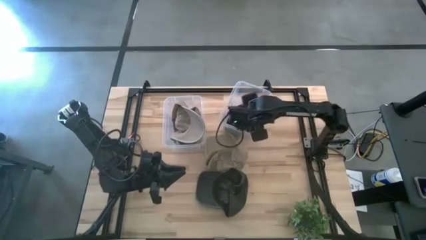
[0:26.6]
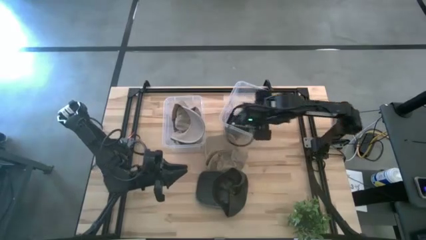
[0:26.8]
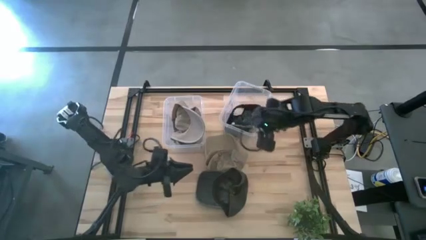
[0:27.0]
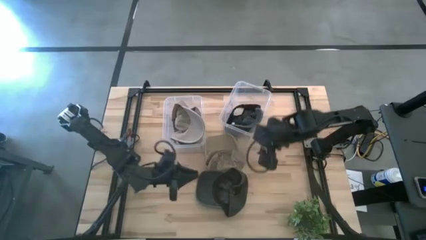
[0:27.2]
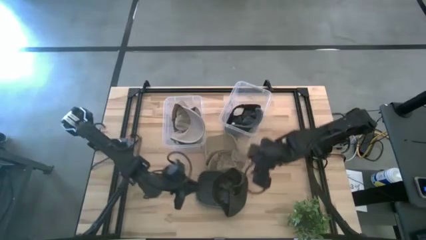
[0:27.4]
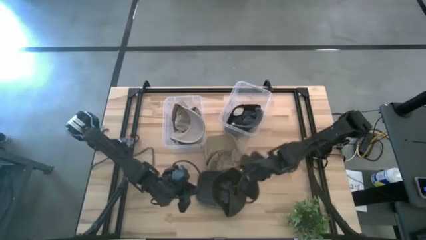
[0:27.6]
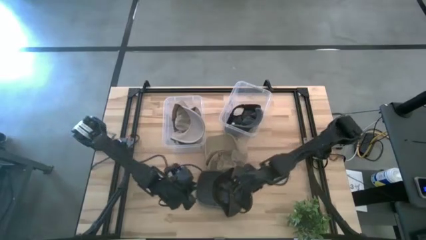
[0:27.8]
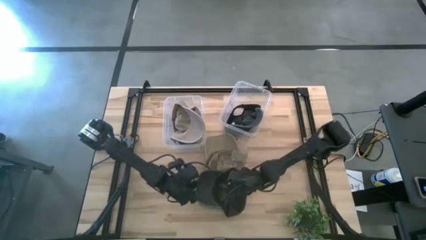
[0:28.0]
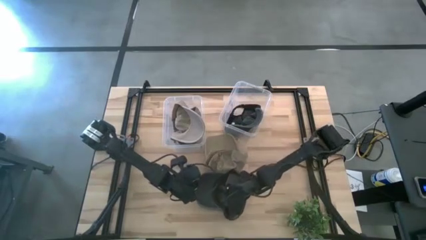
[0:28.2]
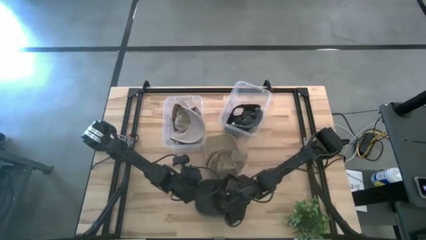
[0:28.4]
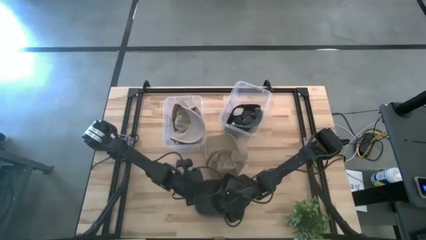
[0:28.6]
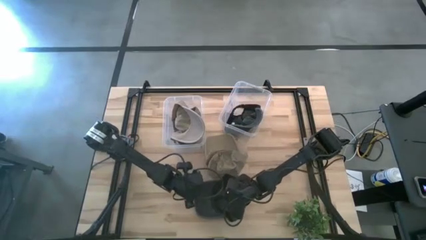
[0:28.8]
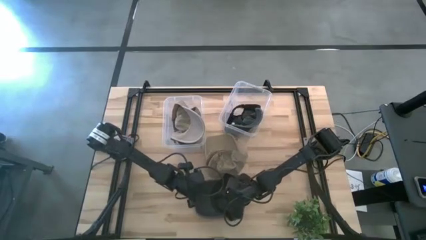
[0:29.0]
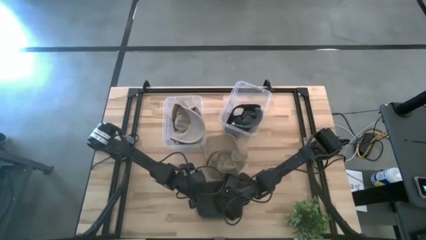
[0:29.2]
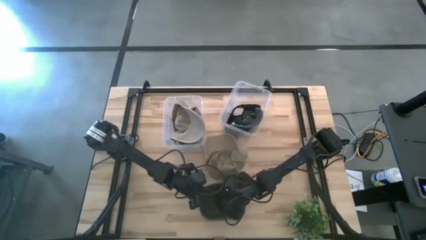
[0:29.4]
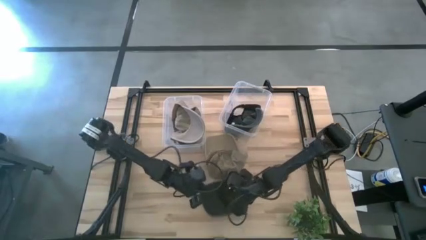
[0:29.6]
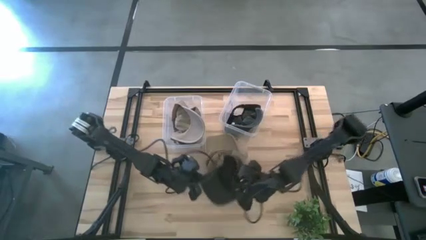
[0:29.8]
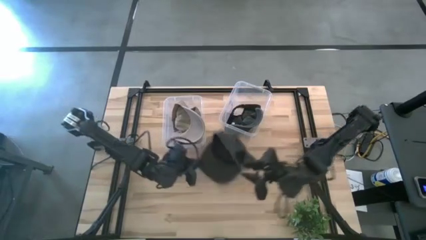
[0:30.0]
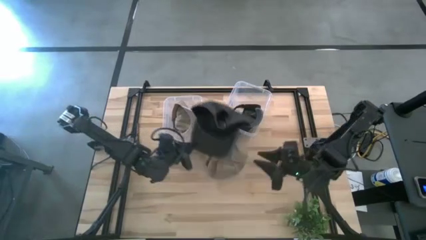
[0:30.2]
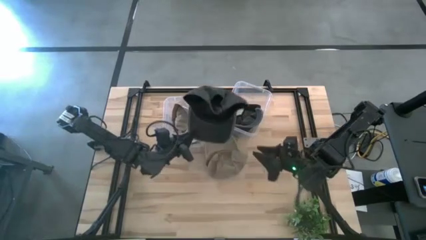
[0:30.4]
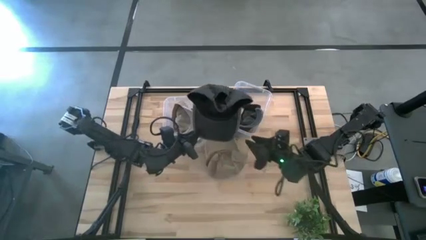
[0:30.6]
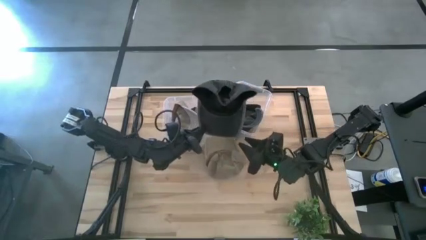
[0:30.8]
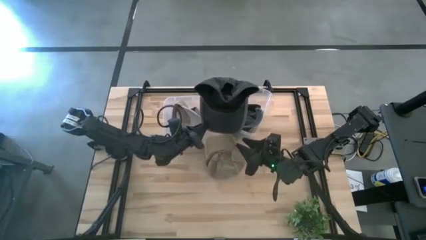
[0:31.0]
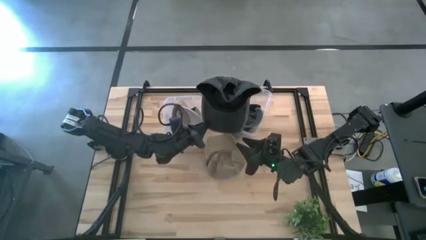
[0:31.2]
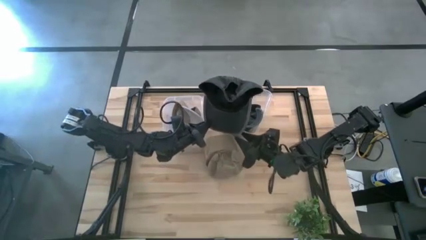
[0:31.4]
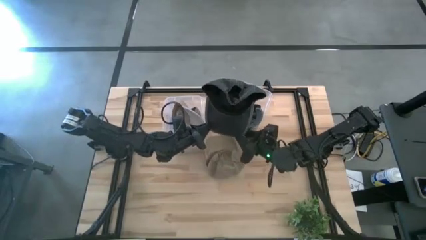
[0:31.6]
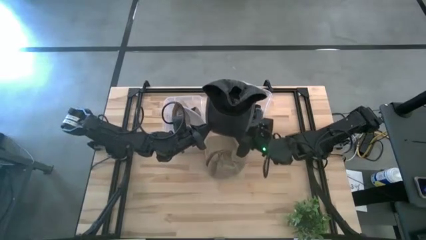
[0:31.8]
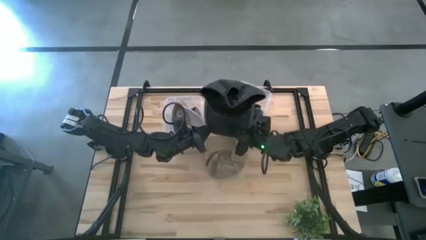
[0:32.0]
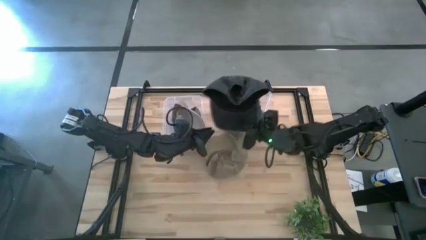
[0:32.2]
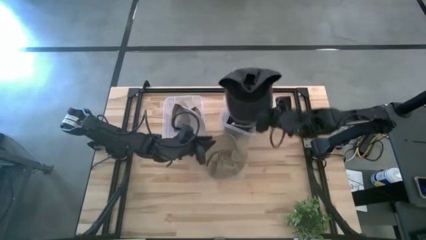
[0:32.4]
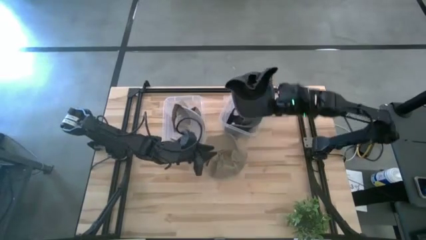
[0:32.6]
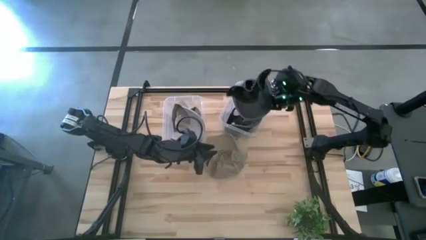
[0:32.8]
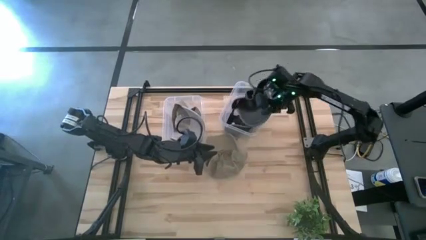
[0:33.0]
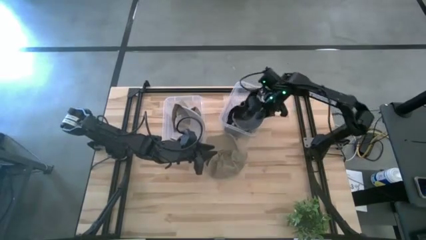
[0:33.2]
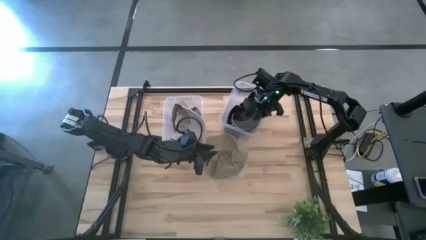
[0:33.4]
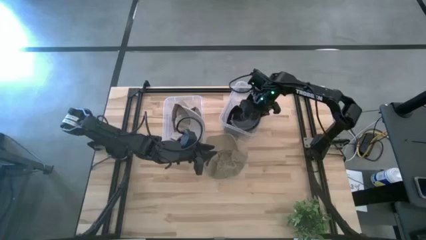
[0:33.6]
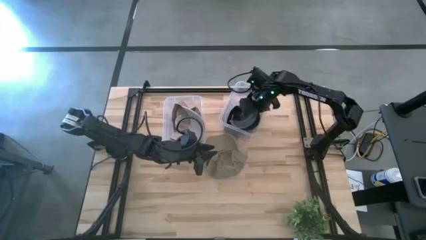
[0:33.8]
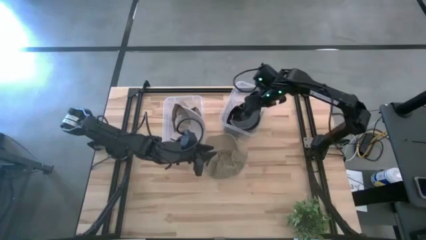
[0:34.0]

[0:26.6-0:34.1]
Task: Pick & Place hat
Put the blue cap into the right transparent bin

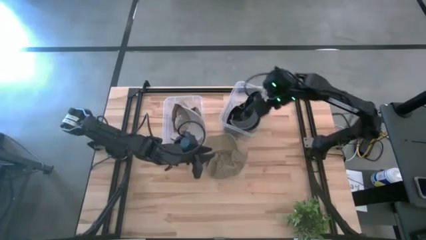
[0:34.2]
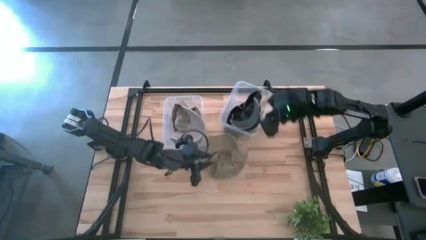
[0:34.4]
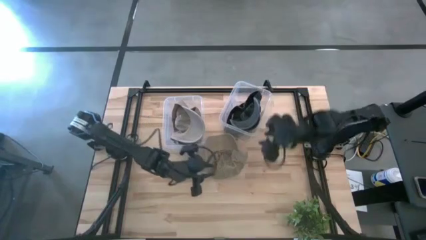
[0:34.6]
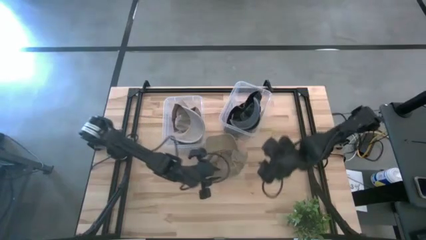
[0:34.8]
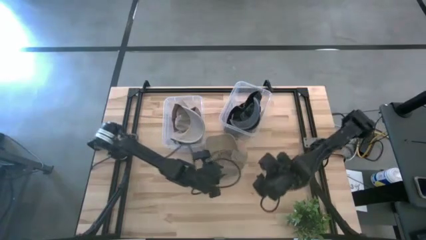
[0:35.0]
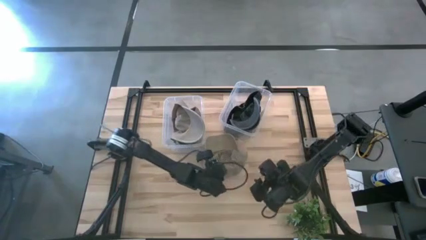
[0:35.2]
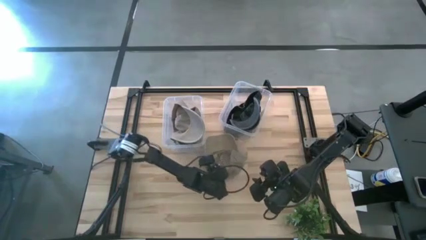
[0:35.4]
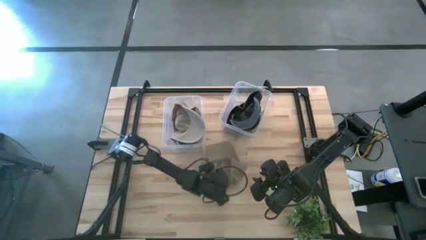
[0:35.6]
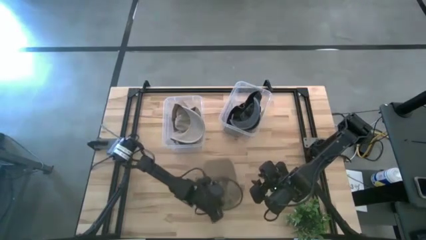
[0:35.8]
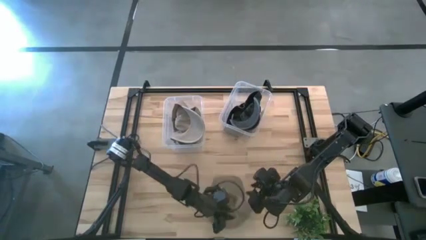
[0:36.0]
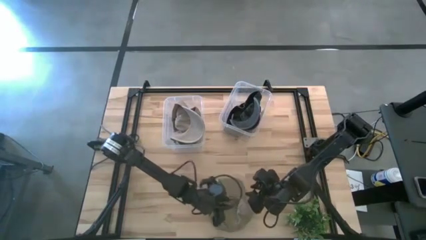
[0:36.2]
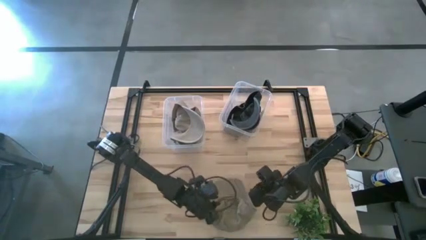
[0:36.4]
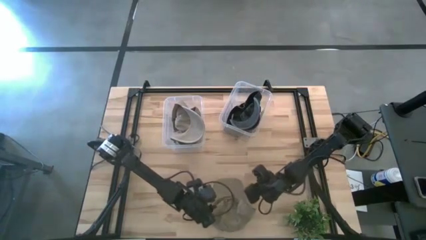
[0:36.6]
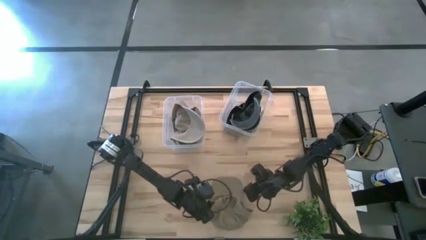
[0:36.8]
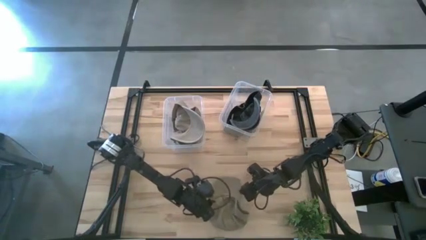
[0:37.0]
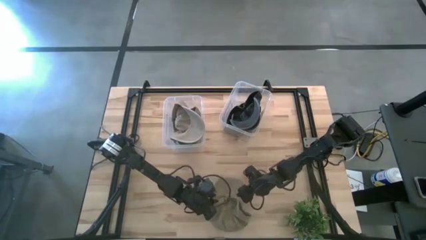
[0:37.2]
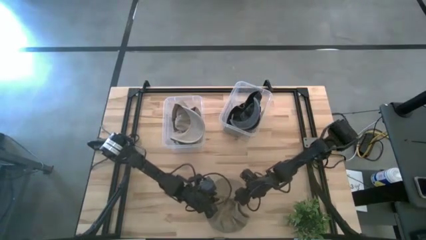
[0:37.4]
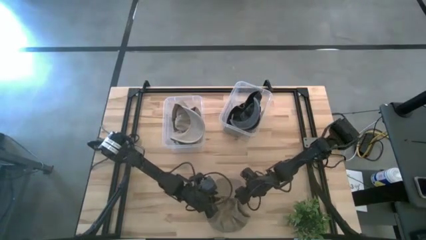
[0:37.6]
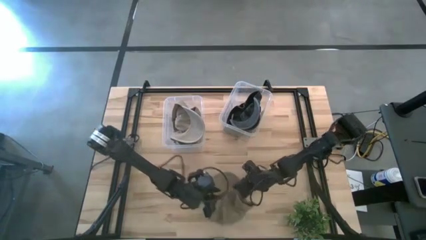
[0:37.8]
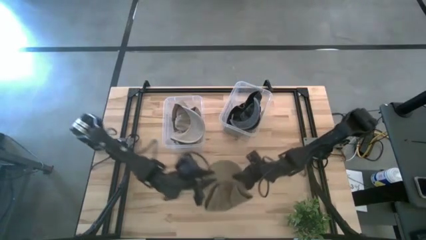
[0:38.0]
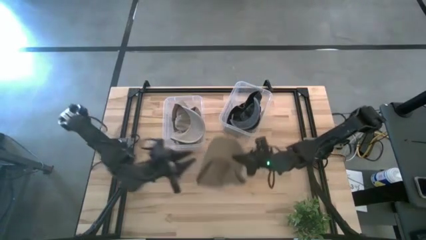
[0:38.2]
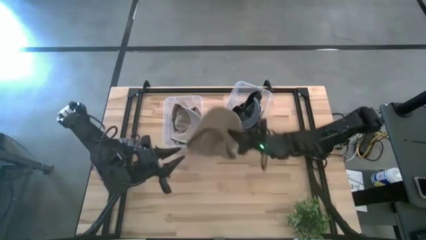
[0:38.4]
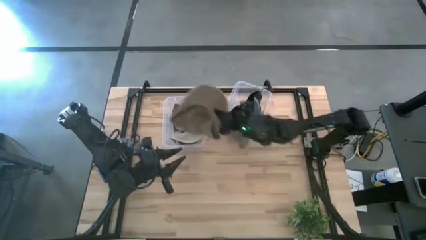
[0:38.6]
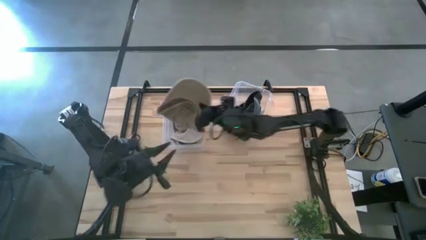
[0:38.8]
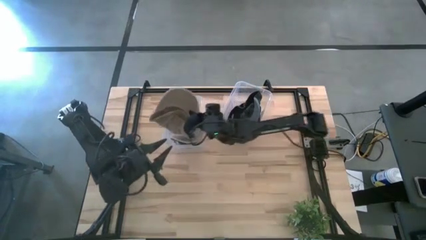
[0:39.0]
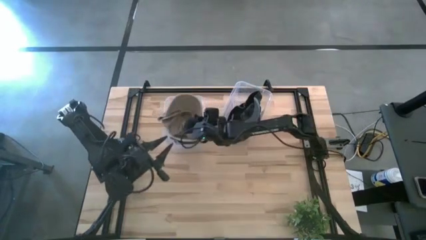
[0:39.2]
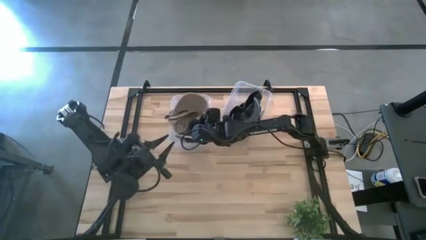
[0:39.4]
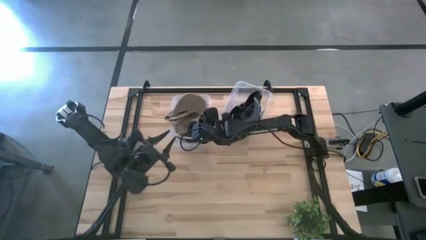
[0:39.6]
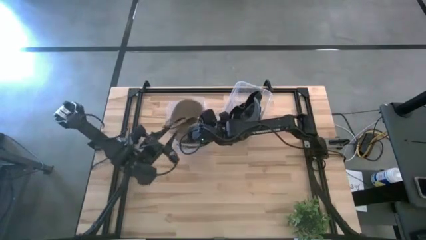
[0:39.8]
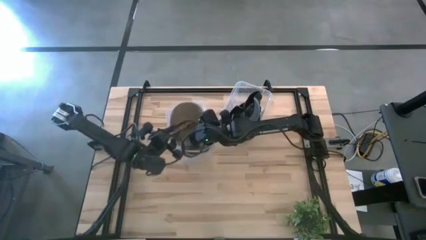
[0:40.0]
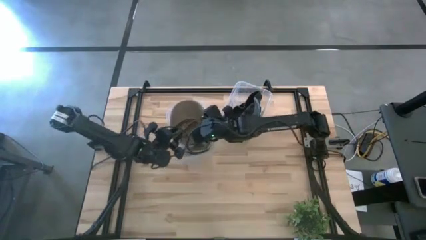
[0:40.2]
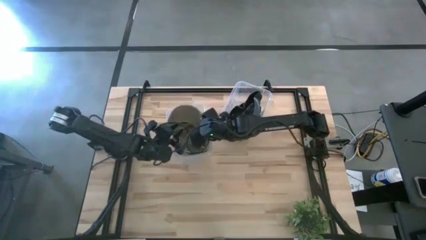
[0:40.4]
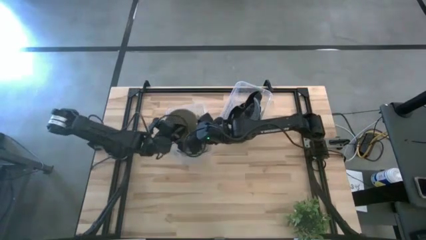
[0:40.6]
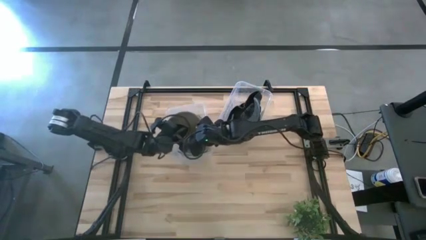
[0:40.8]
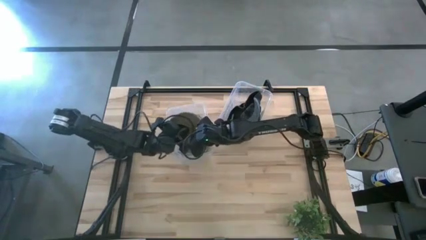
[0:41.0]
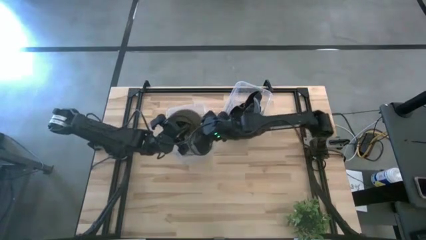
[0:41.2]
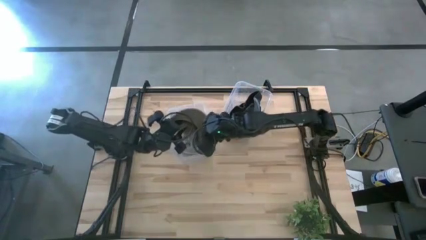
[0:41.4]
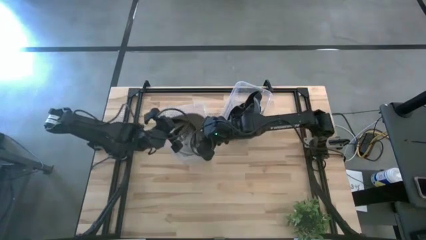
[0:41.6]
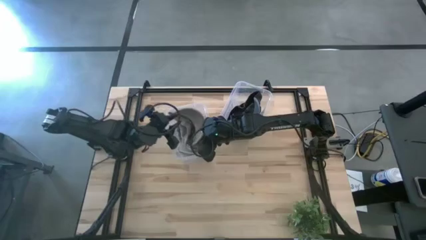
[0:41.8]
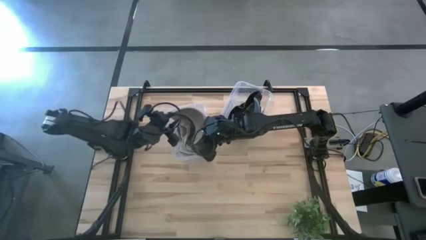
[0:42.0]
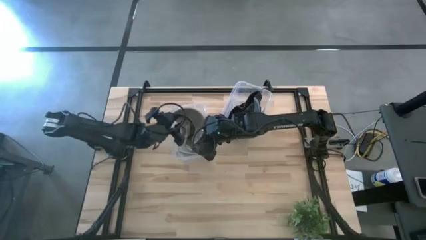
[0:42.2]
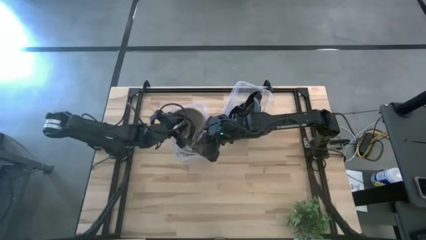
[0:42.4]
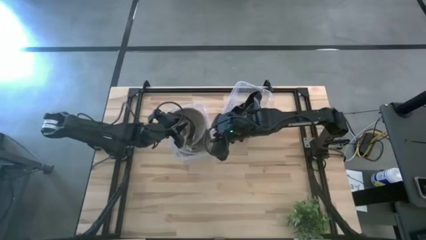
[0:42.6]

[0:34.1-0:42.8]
Put the brown cap into the left transparent bin
